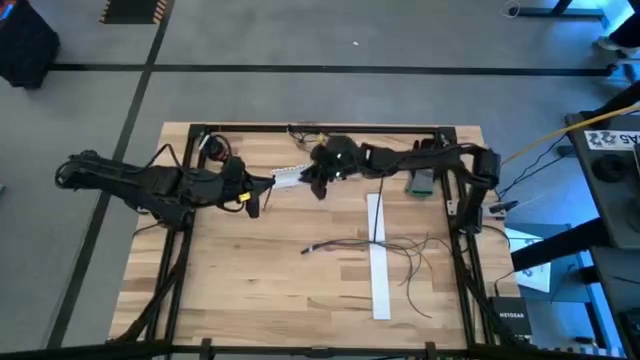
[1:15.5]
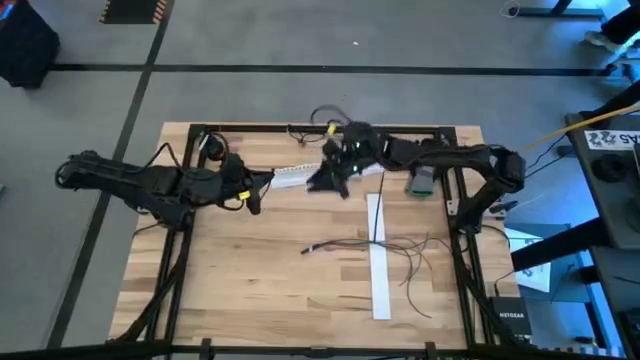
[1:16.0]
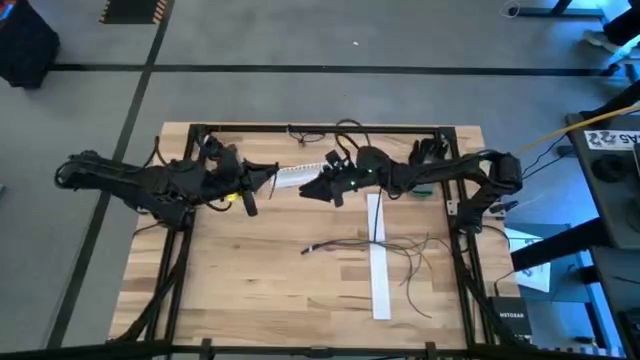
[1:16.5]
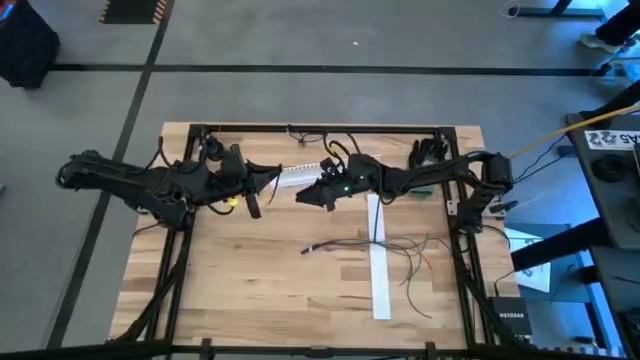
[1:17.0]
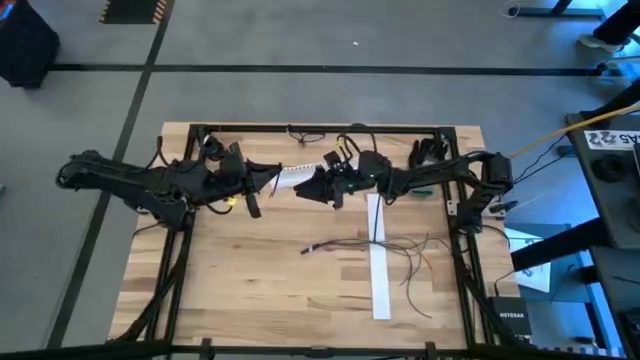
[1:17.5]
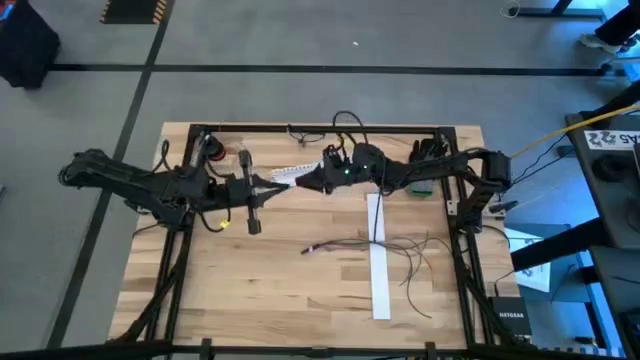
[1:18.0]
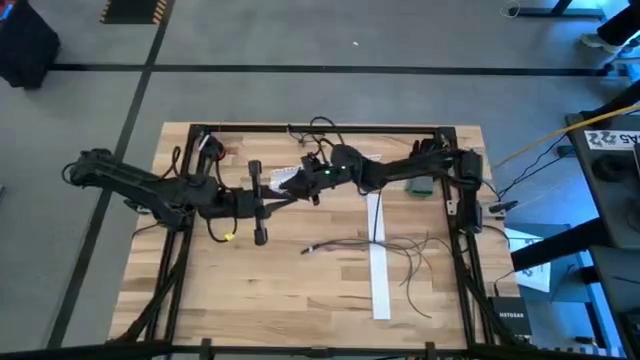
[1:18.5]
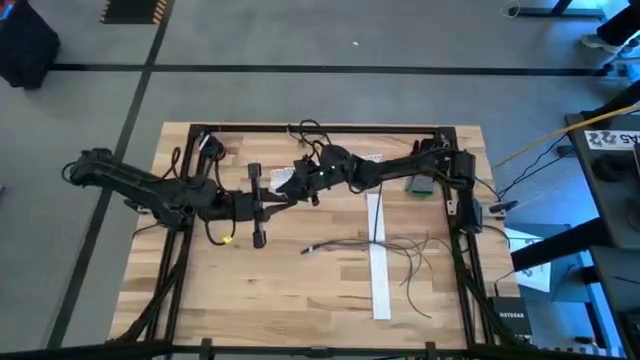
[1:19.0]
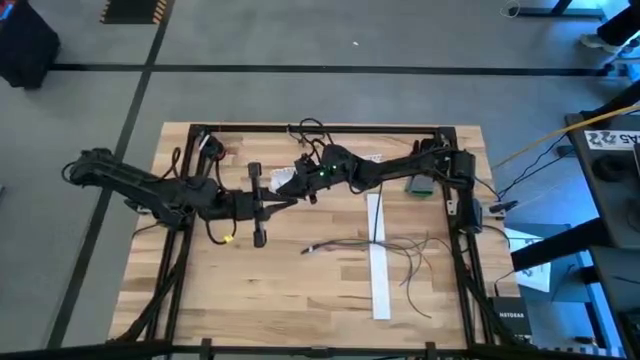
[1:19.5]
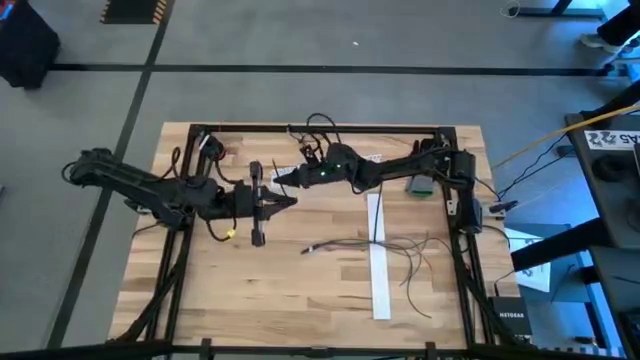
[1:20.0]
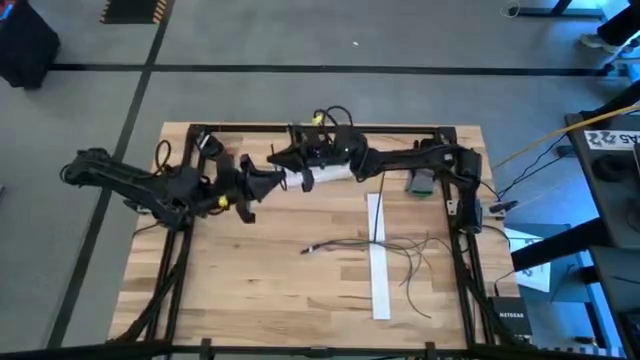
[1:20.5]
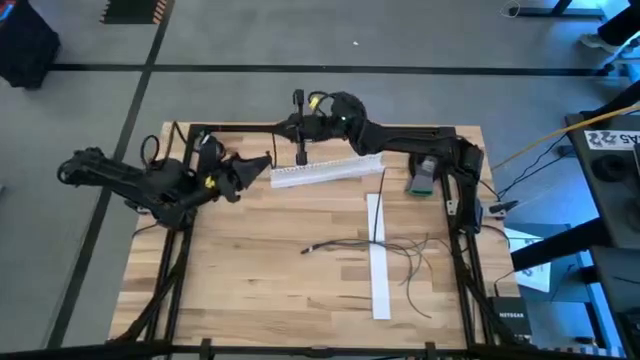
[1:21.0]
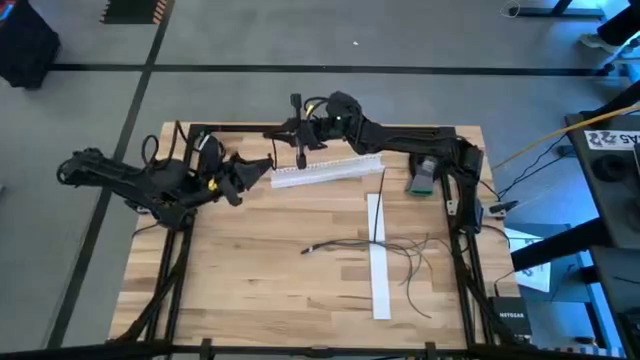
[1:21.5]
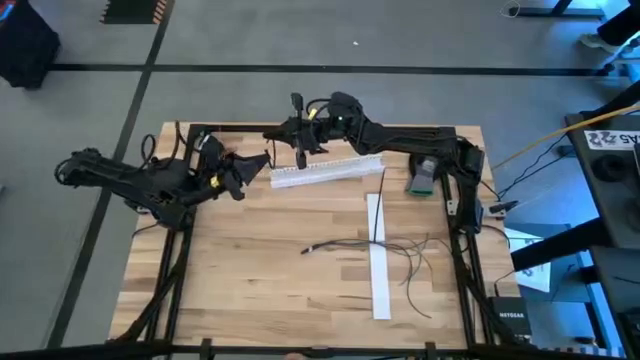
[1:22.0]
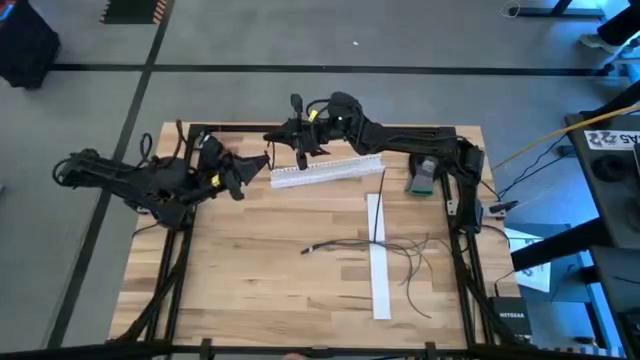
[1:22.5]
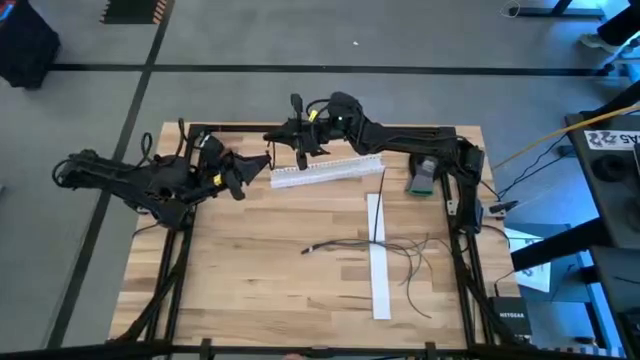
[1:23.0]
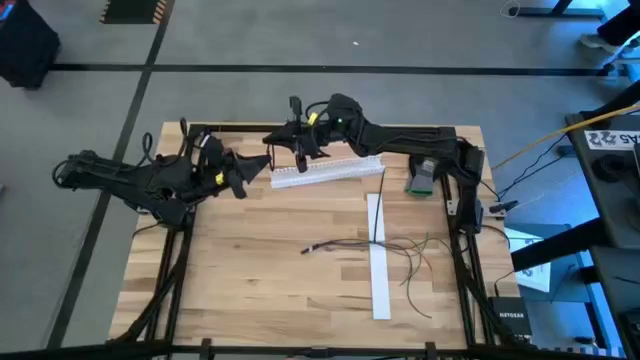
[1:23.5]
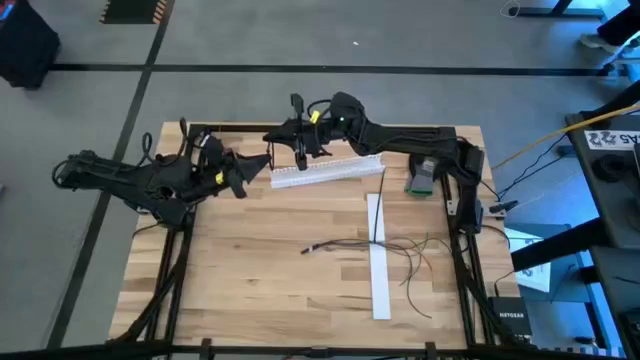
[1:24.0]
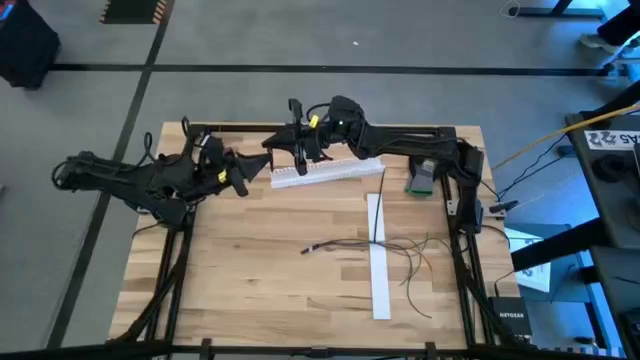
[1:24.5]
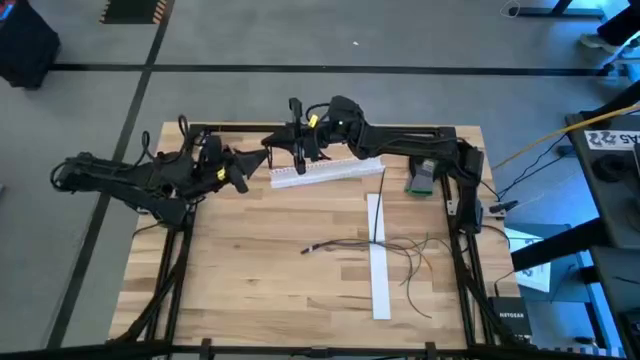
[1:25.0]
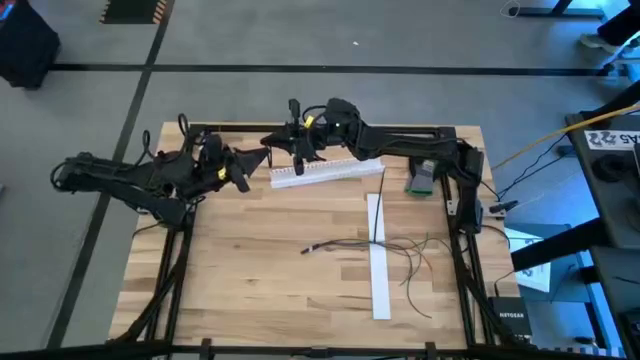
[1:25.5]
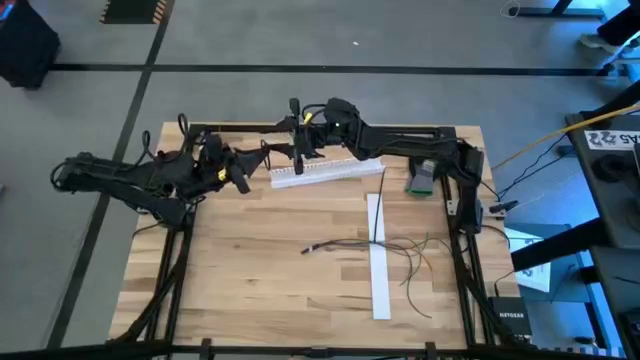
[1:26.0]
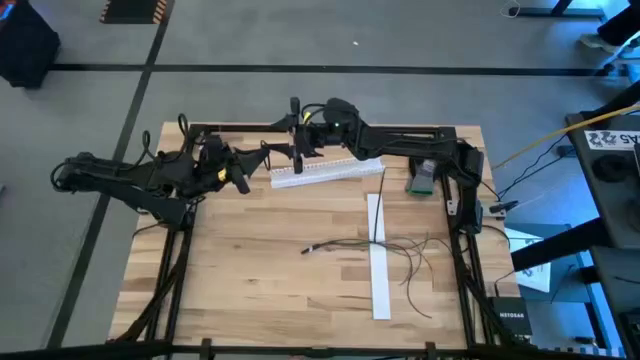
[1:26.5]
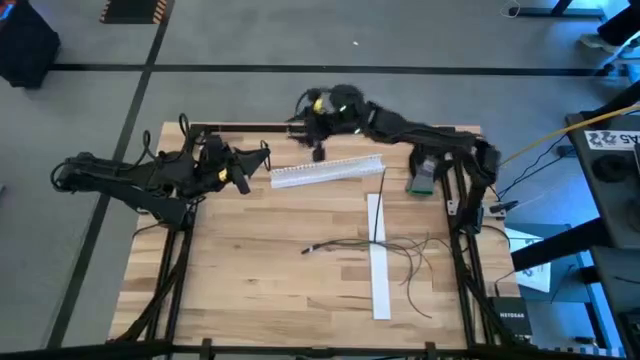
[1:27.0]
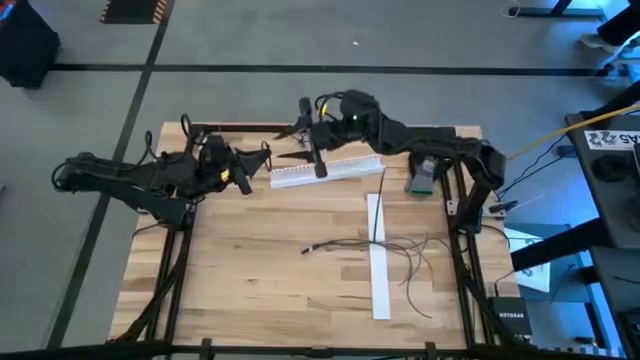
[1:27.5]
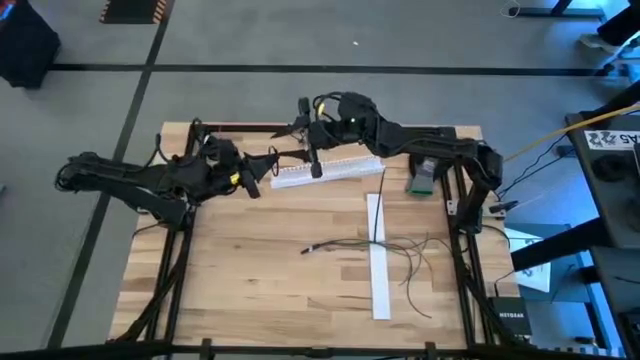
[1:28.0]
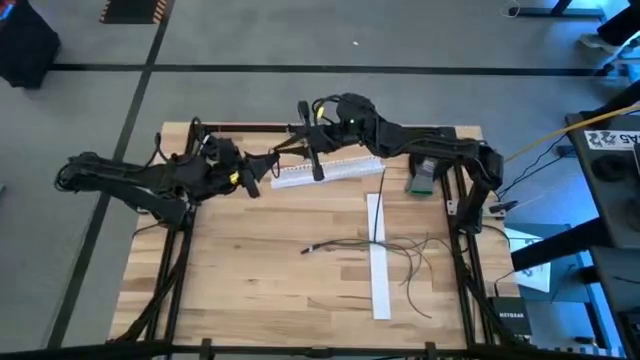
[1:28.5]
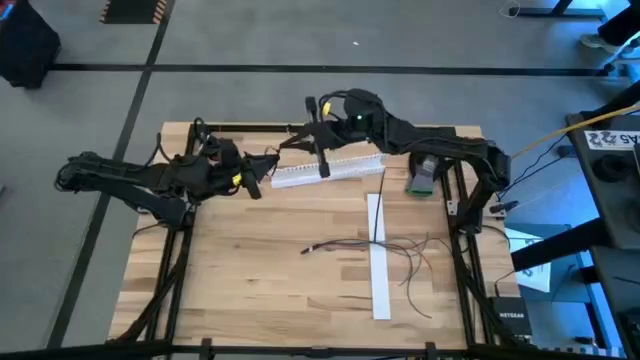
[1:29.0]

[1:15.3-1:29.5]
Task: Ziptie cables
Wrap the black zip-tie around the cable wires
